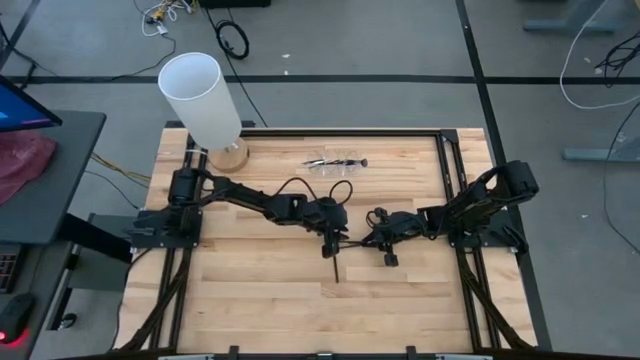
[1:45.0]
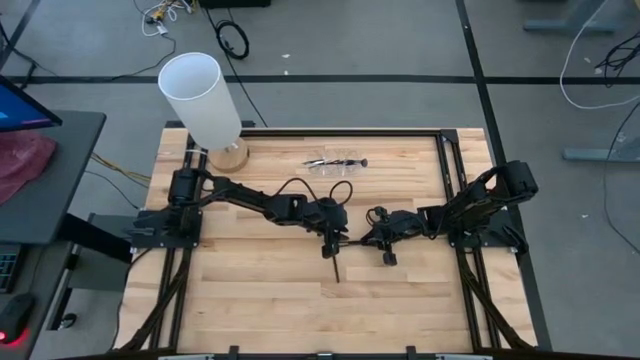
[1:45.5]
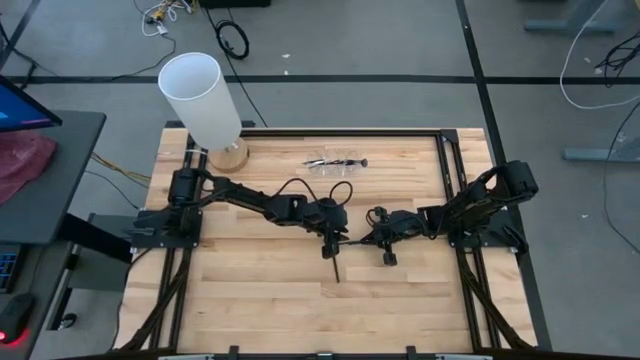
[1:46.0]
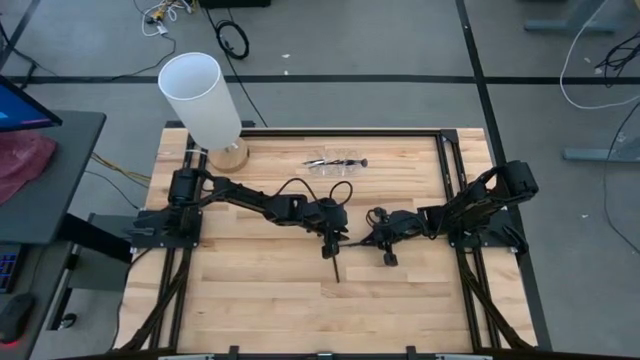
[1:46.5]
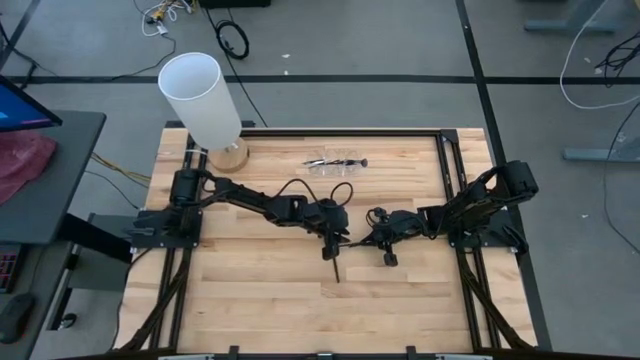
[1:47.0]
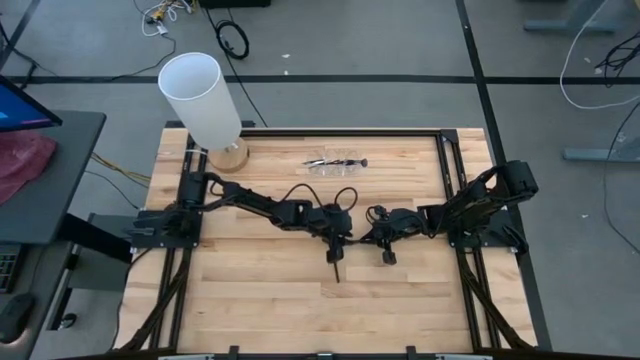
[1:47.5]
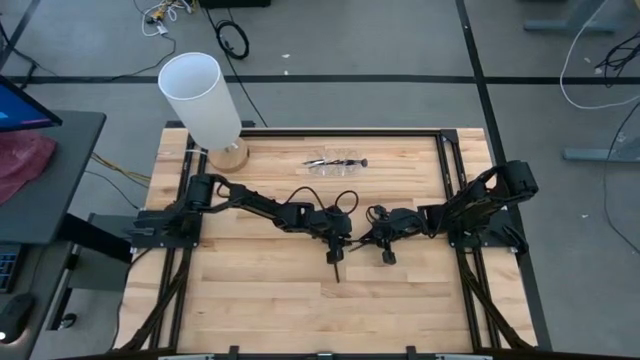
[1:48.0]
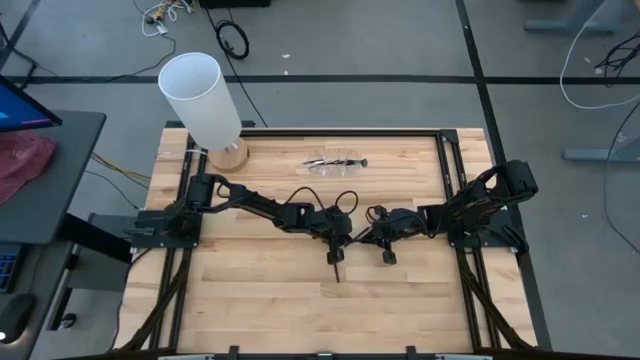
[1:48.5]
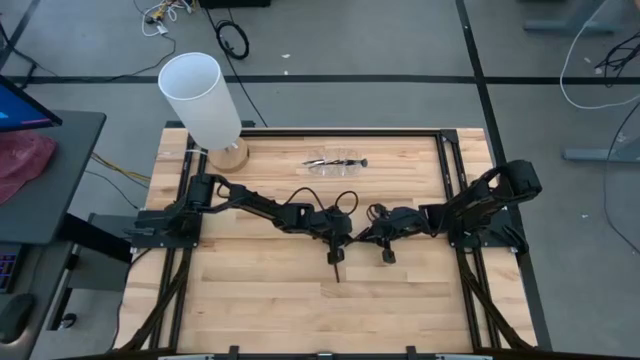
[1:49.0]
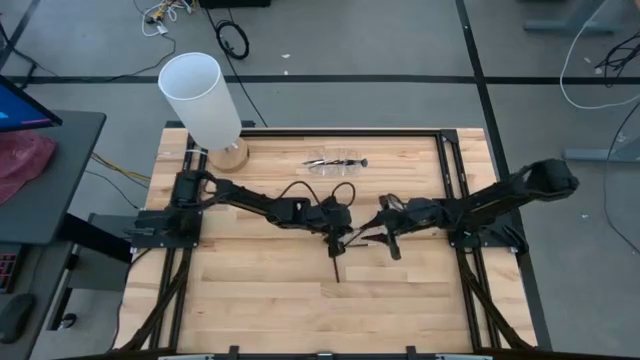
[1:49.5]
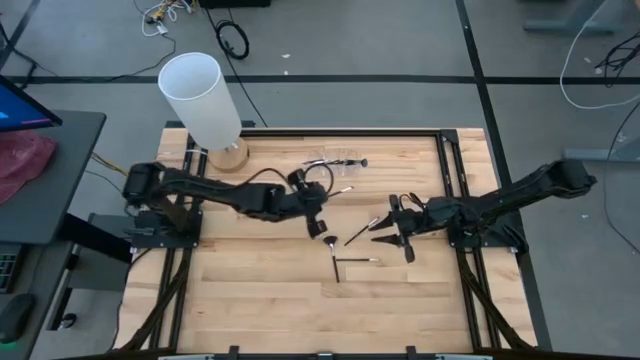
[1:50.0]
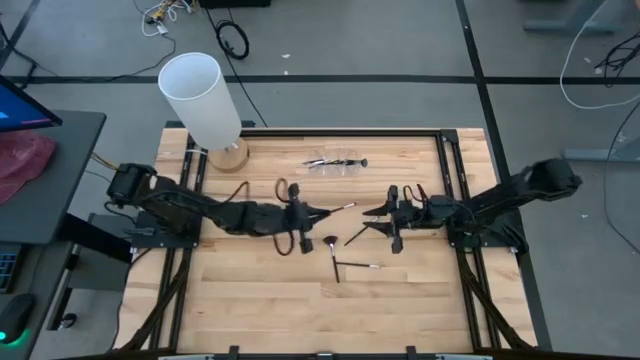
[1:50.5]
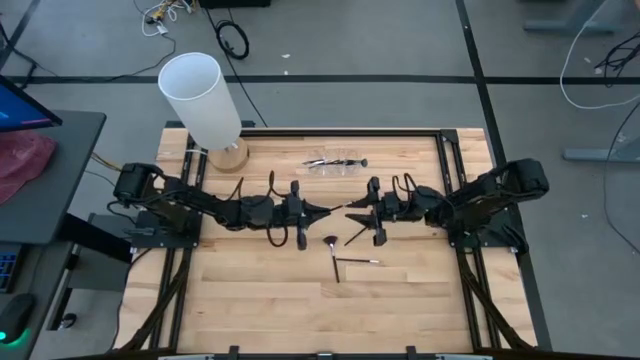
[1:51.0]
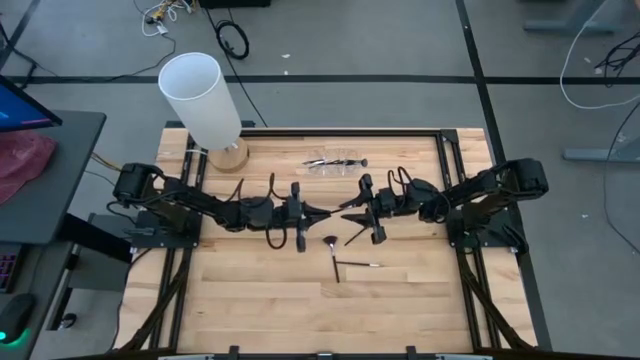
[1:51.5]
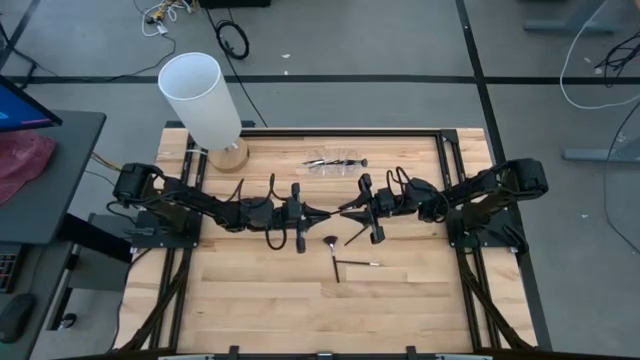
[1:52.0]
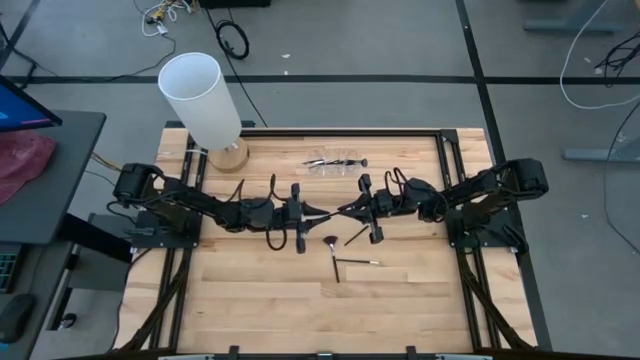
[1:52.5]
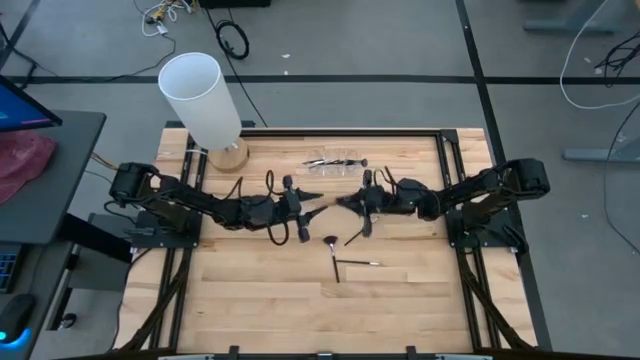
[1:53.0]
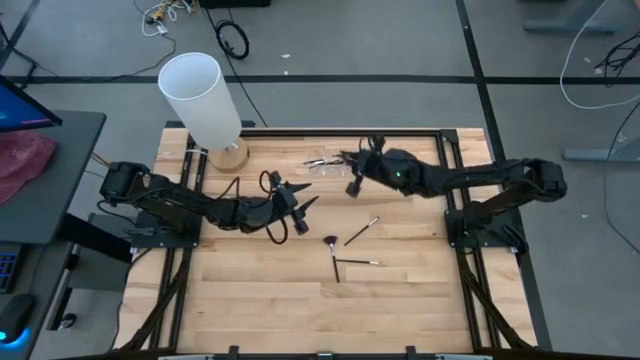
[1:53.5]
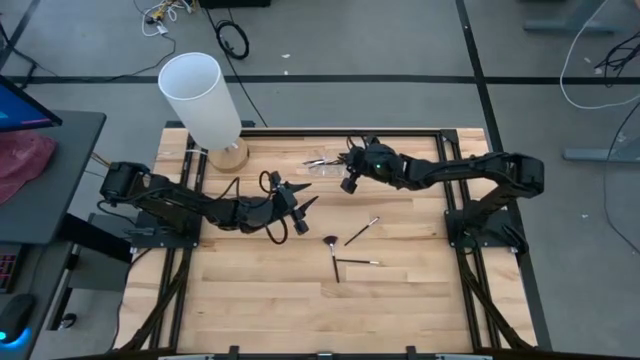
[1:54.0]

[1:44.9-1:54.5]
Task: Pick & Place Makeup Supplies
Put the makeup brush into the transparent organizer

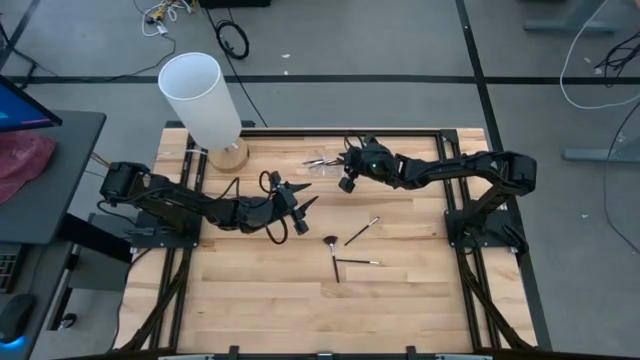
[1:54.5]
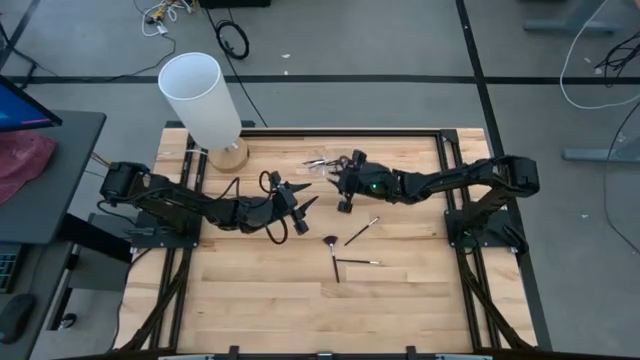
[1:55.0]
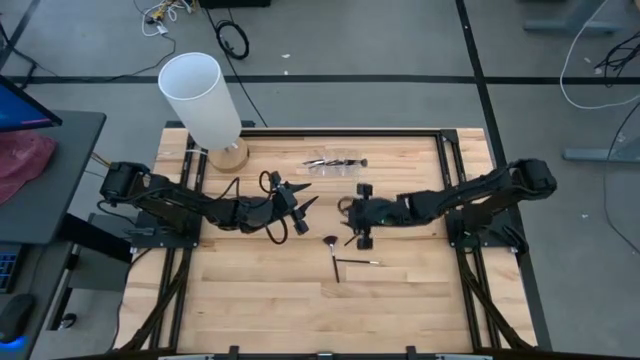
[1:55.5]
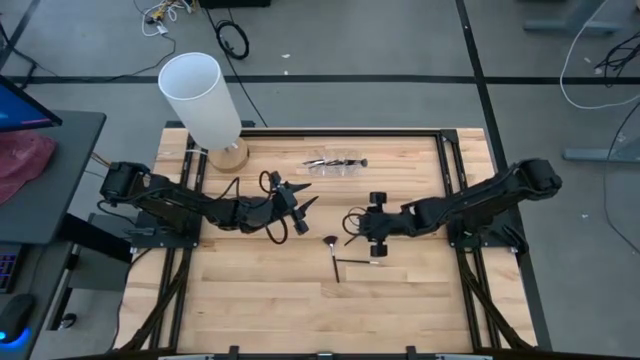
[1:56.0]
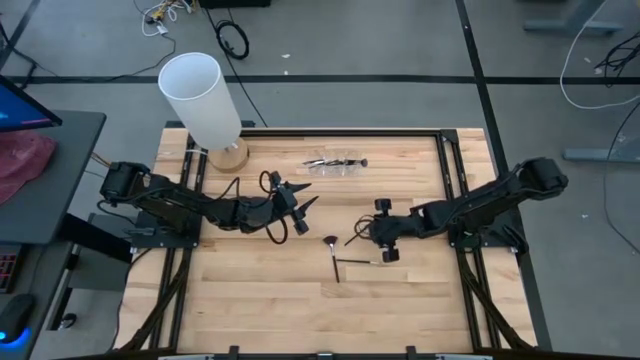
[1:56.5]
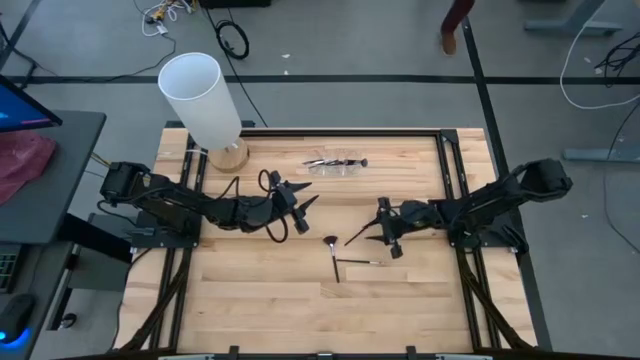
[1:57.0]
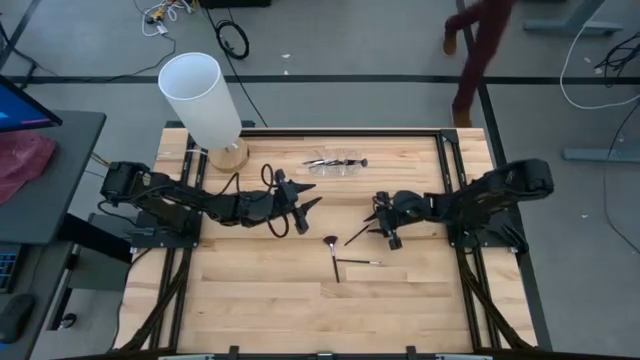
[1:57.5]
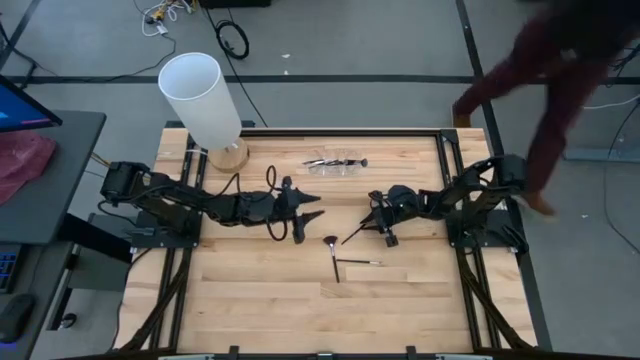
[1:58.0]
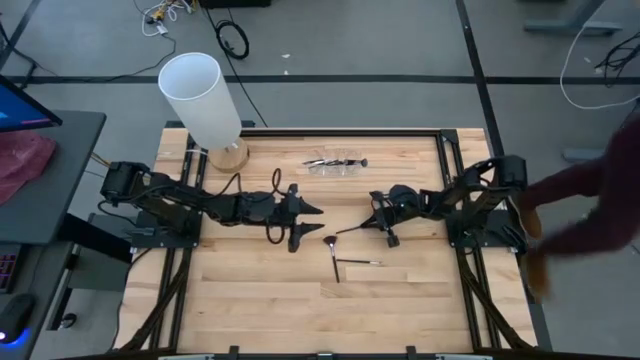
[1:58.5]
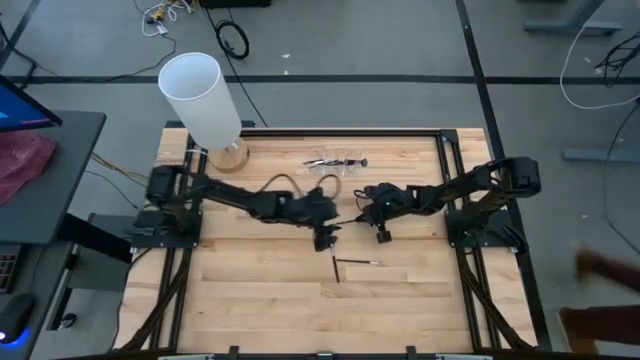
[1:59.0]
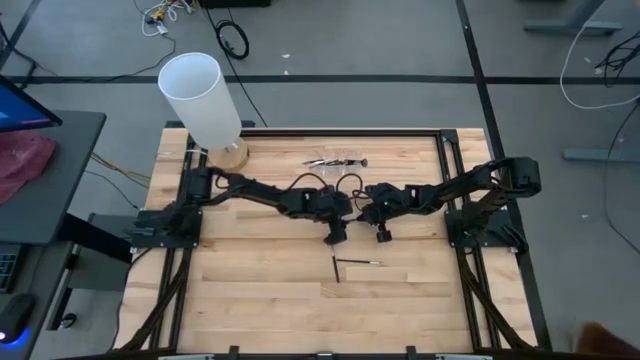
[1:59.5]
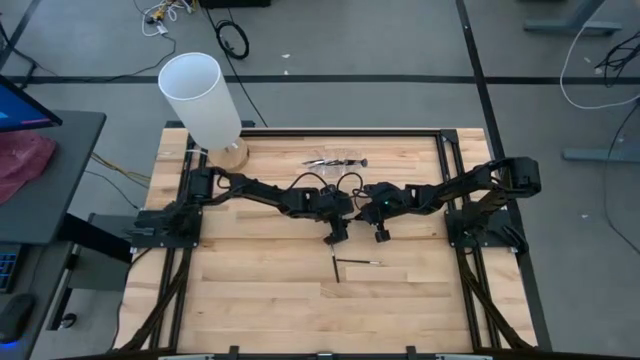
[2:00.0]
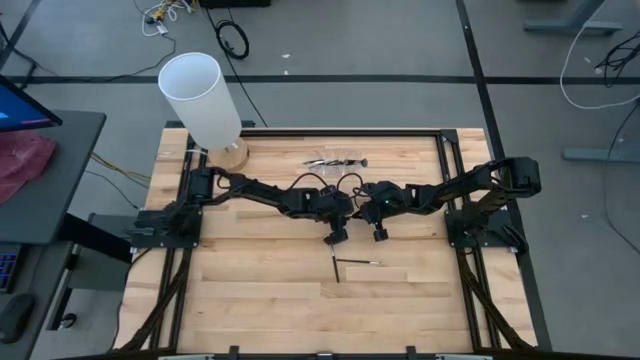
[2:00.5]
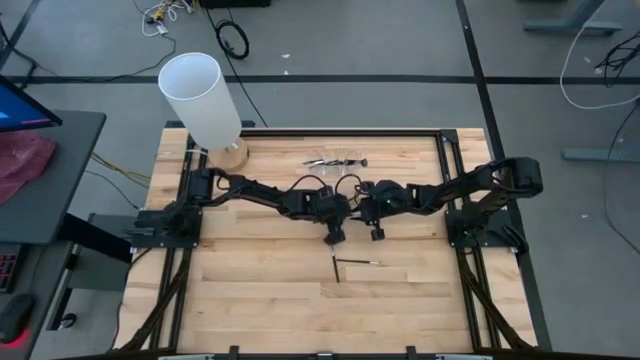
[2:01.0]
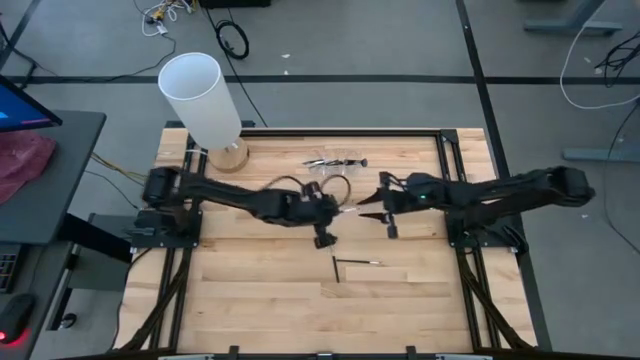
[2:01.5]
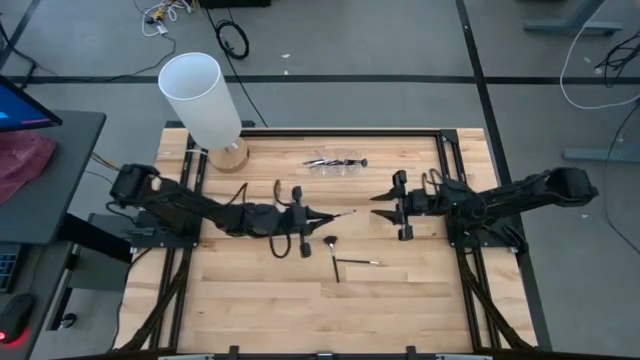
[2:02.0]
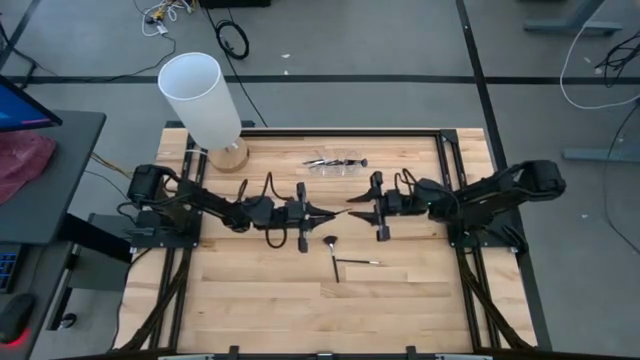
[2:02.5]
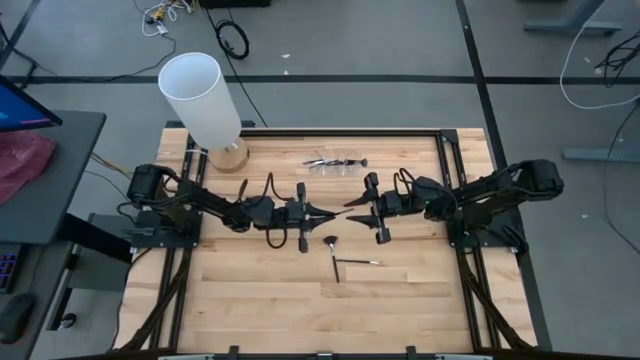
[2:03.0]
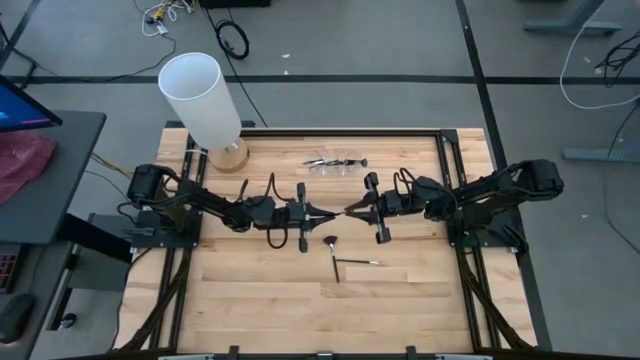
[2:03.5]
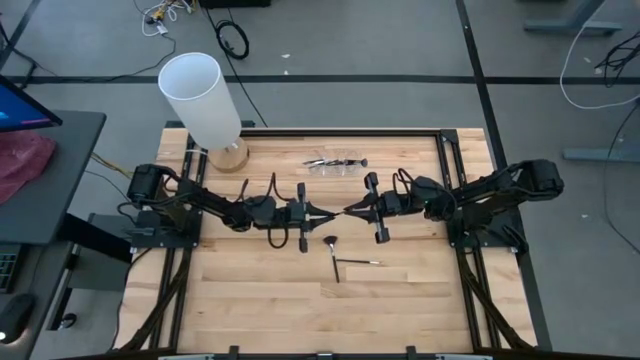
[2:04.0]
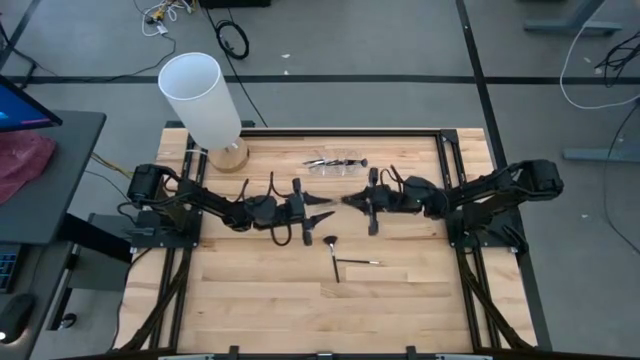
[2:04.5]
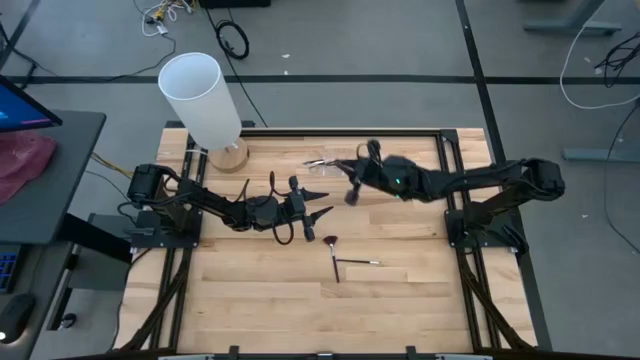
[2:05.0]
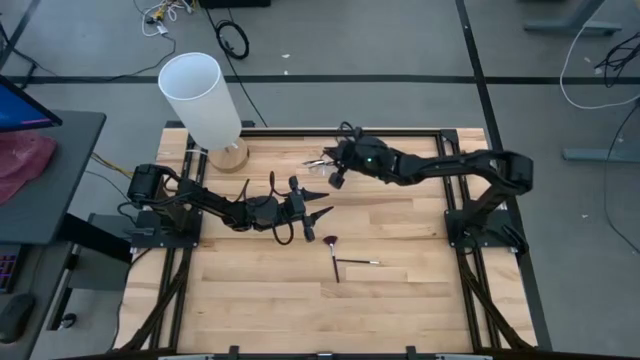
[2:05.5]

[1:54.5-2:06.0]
Put the makeup brush into the transparent organizer

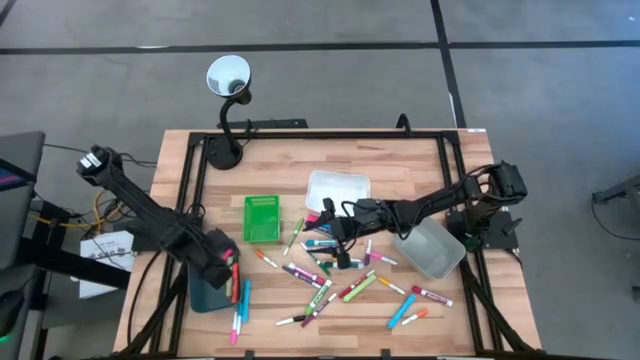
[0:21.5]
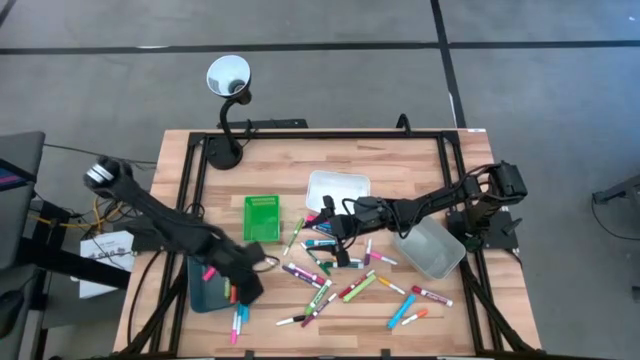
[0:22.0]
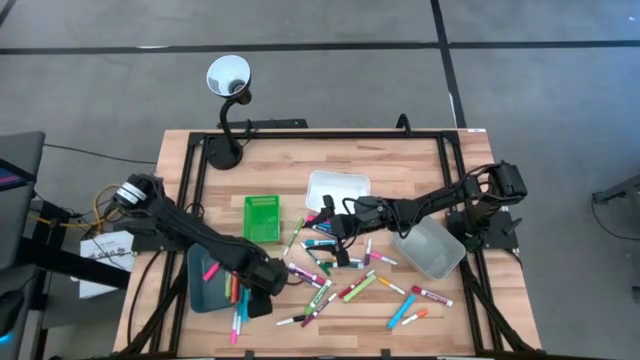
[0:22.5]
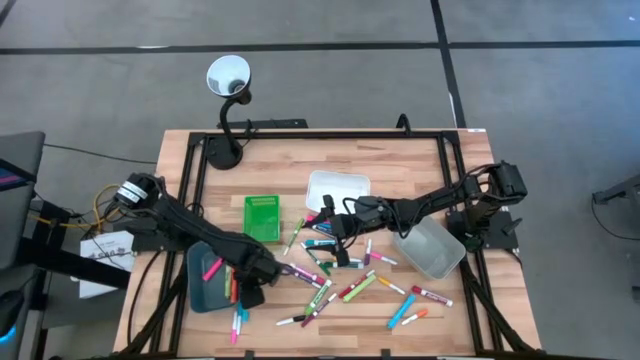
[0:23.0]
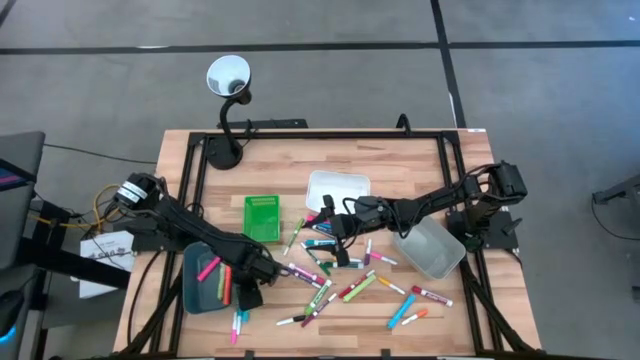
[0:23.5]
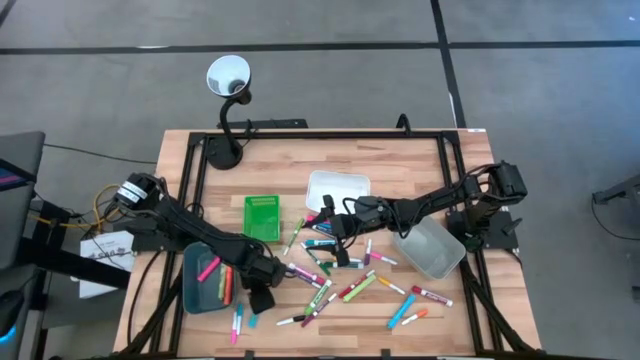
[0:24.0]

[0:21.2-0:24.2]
Task: Pick & Place Markers
Put the big blue highlighter pen into the blue bin
